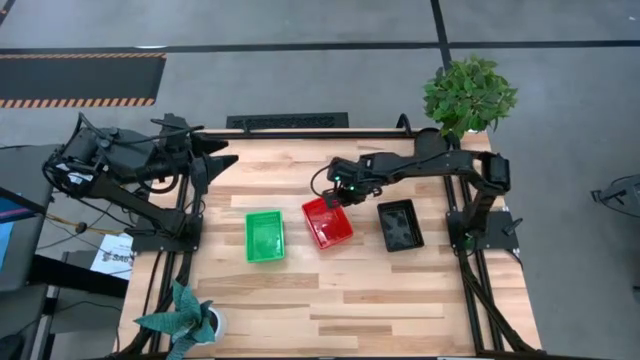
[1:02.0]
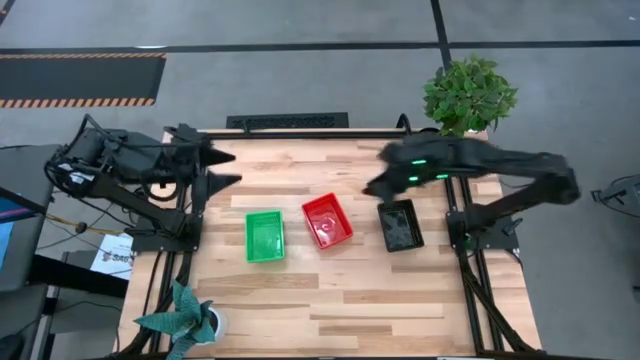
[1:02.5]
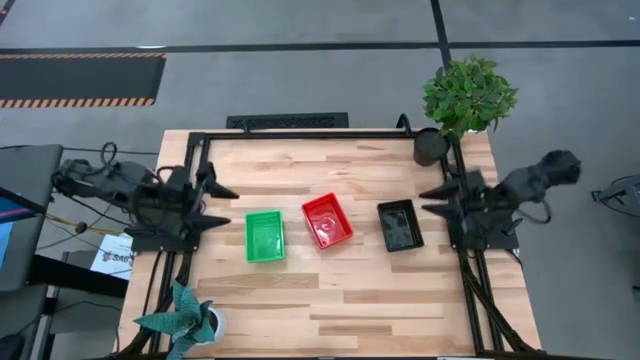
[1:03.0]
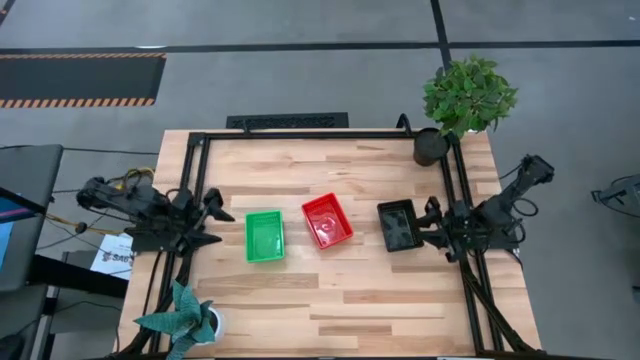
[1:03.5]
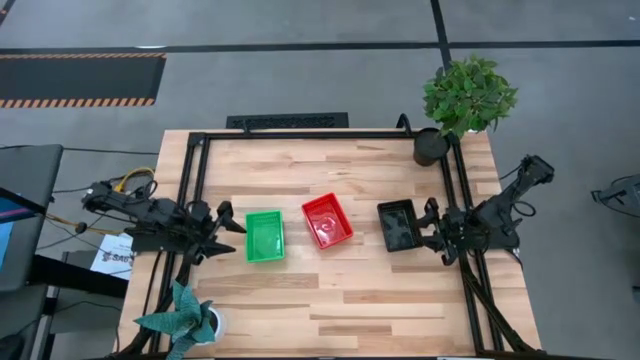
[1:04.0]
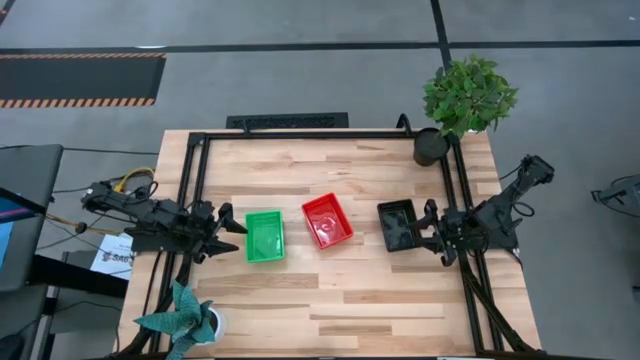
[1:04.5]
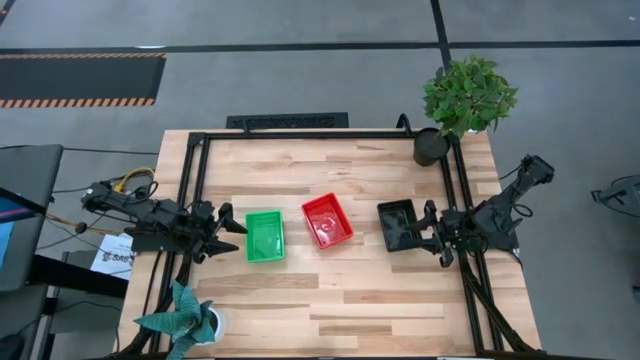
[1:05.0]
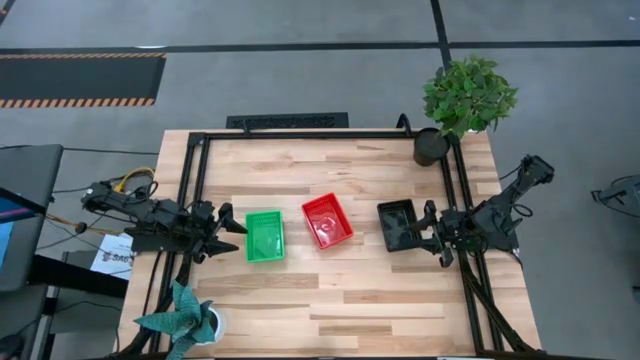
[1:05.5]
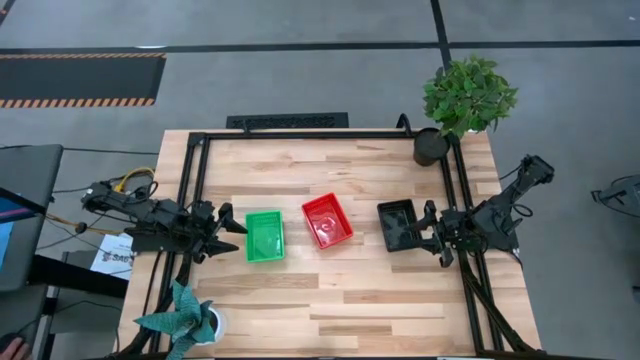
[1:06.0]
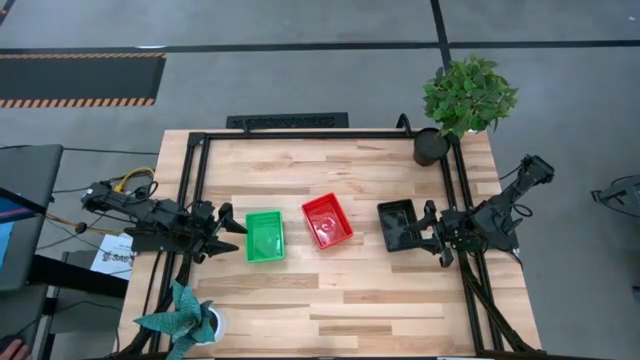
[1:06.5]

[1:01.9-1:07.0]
Return to Home Position

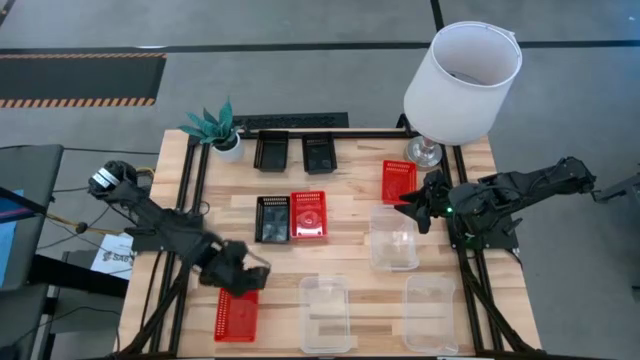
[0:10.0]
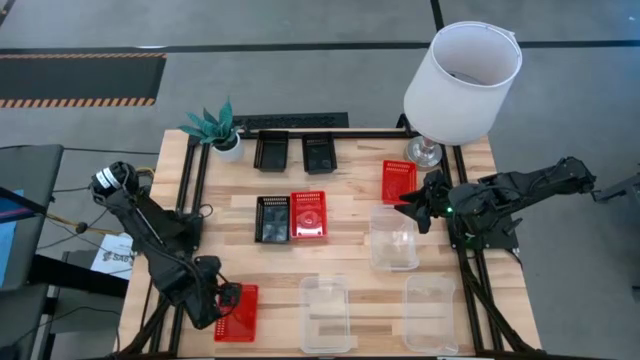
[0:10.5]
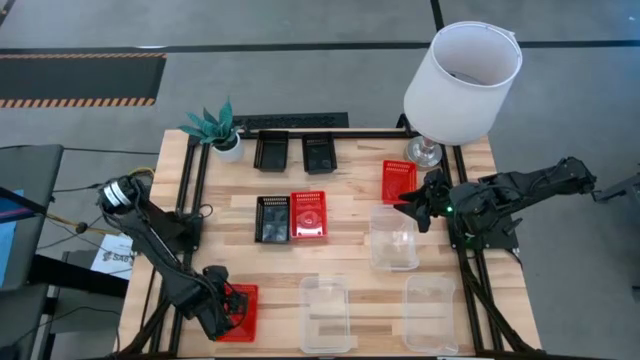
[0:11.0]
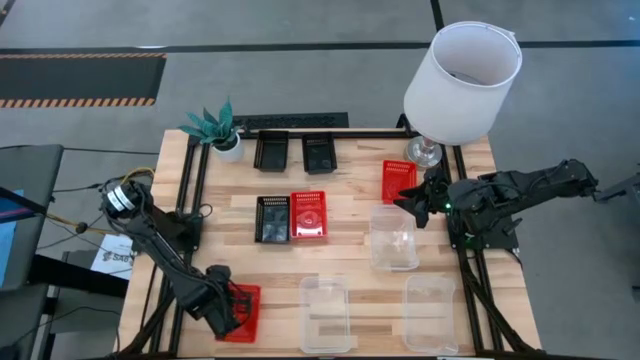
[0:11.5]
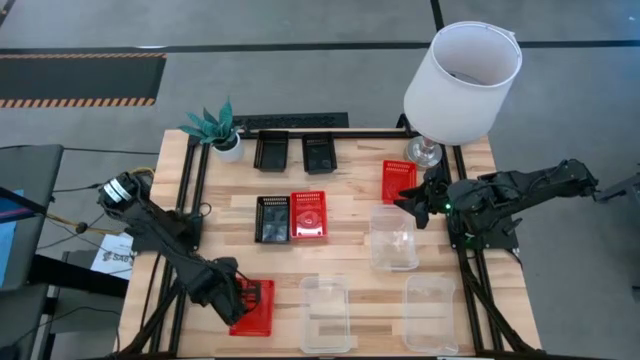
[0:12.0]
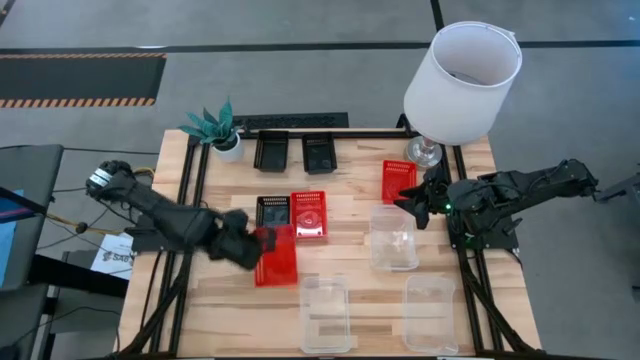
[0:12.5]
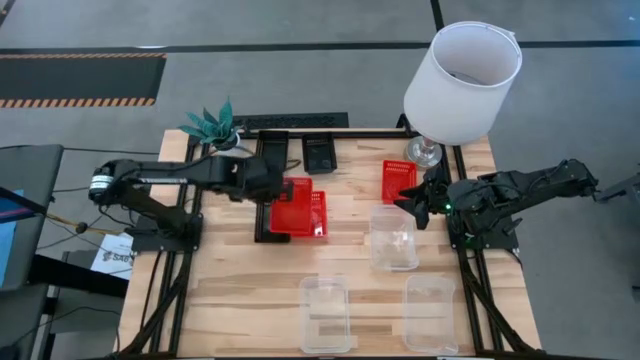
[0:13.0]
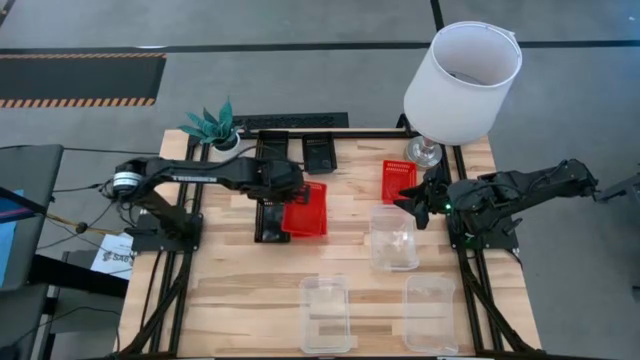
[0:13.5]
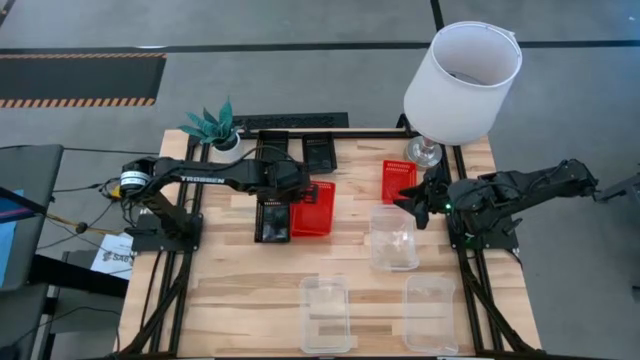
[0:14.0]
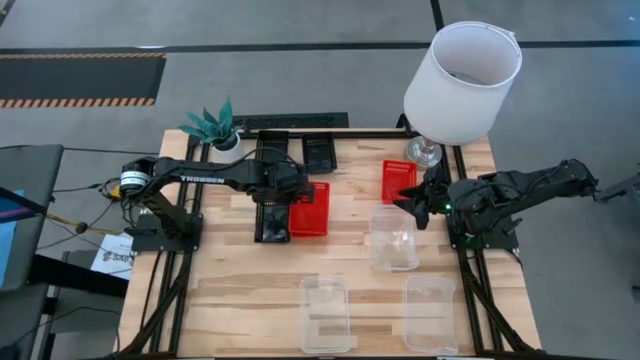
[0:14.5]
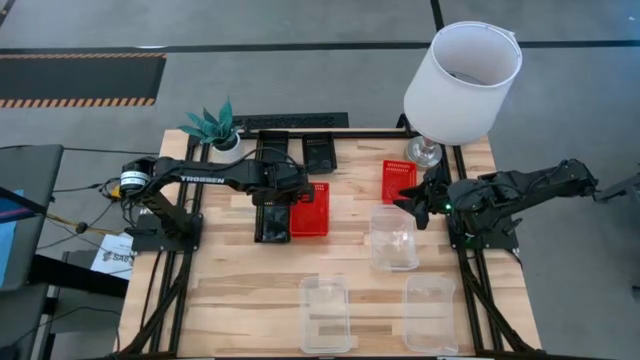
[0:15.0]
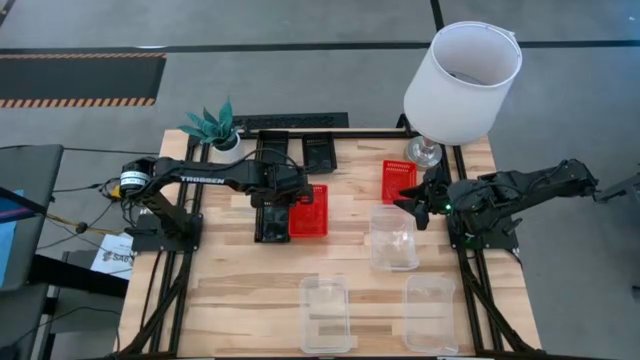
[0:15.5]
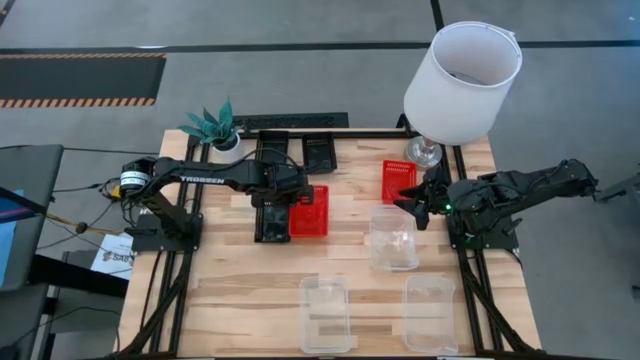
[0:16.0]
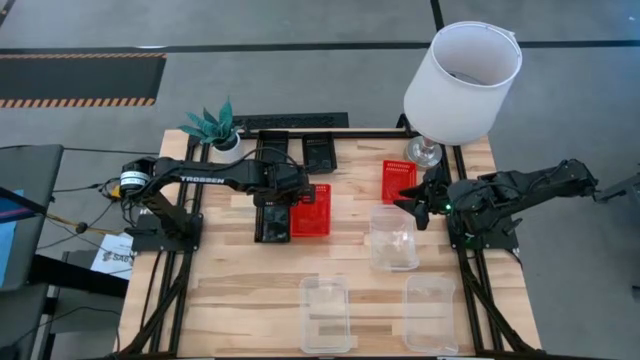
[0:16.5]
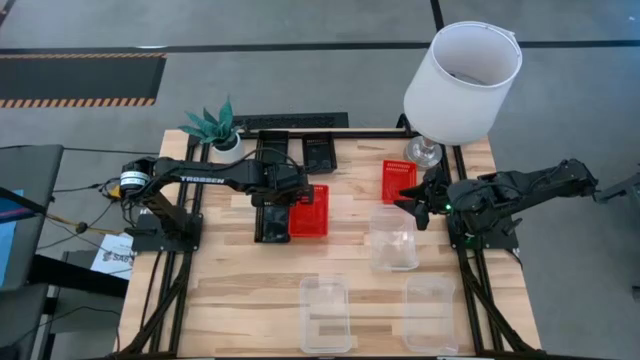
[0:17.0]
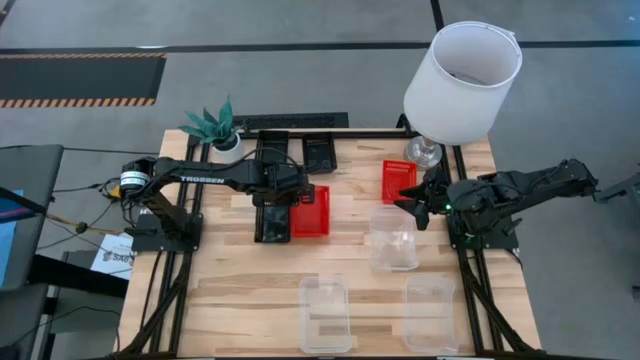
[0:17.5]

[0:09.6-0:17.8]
Stack the bottom red bin on top of the middle red bin

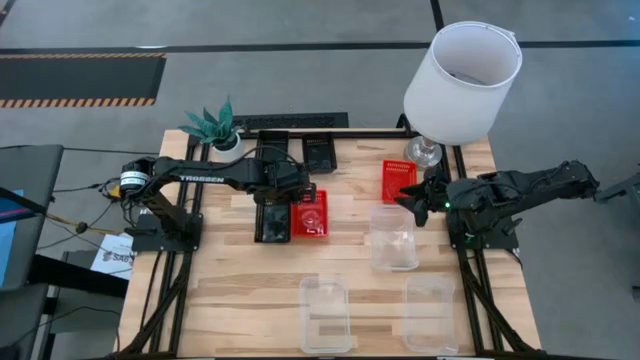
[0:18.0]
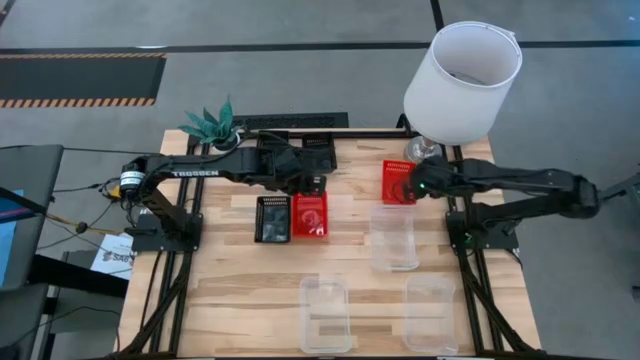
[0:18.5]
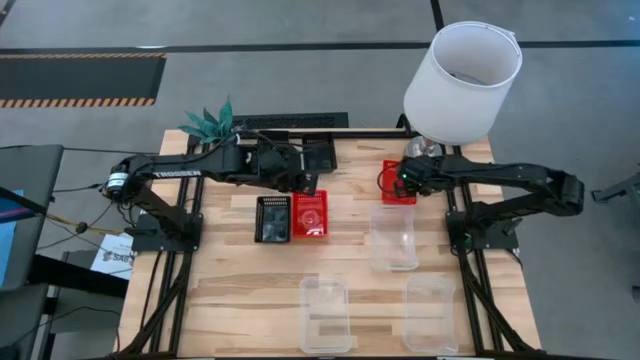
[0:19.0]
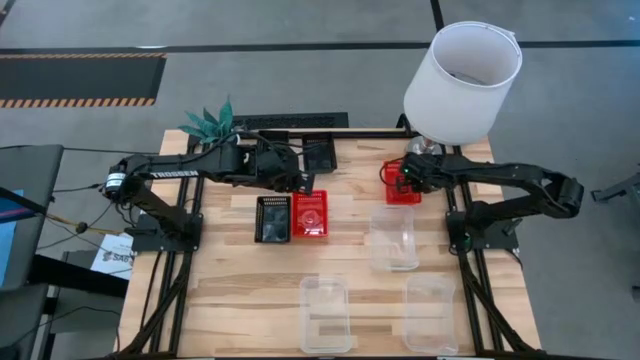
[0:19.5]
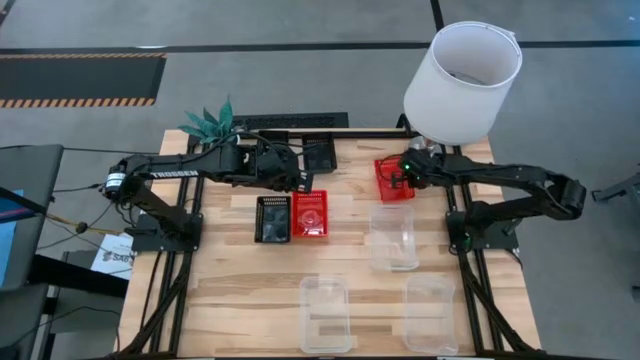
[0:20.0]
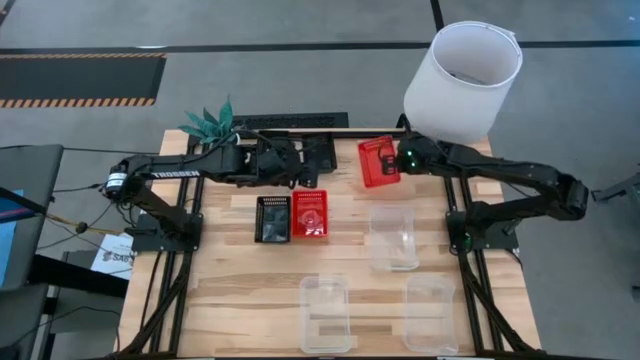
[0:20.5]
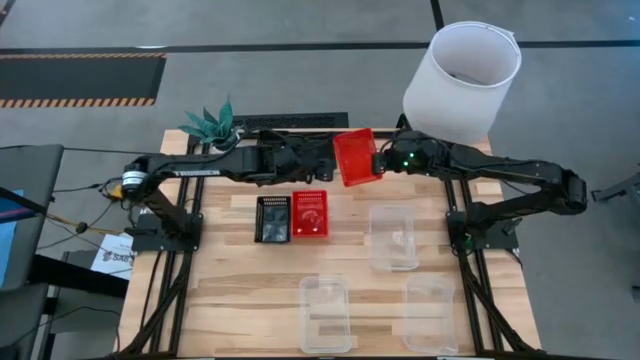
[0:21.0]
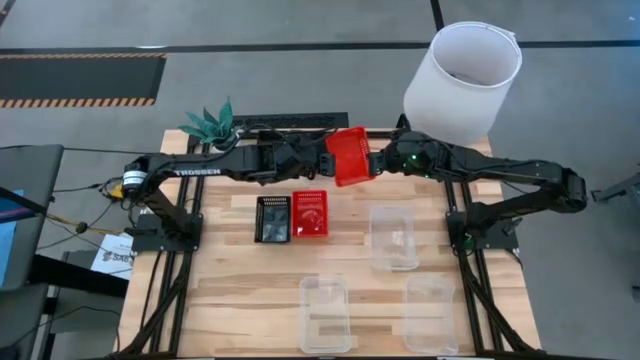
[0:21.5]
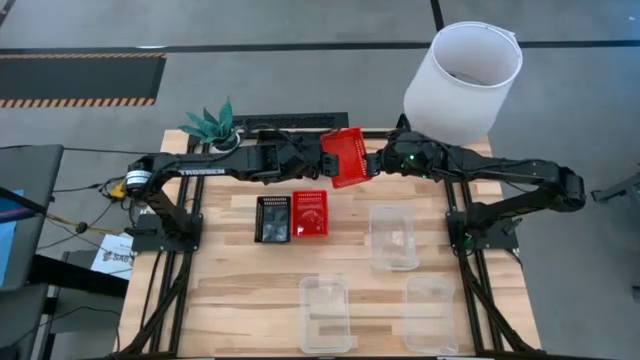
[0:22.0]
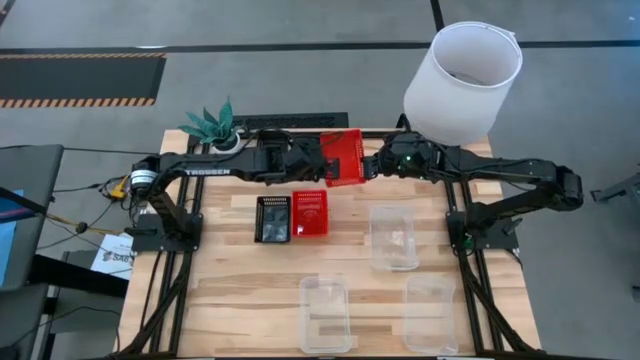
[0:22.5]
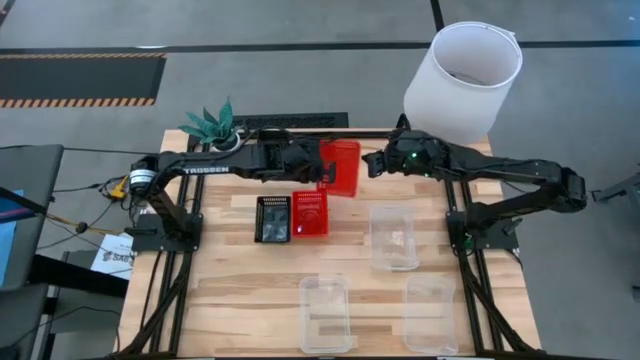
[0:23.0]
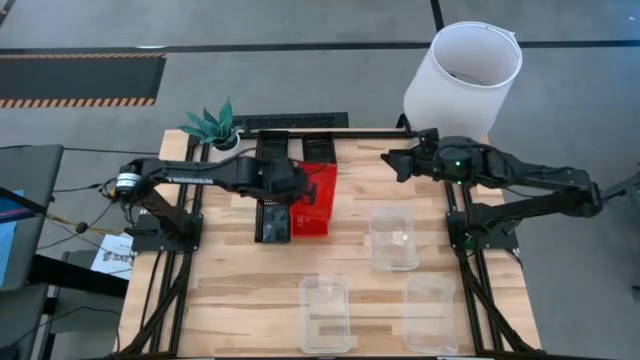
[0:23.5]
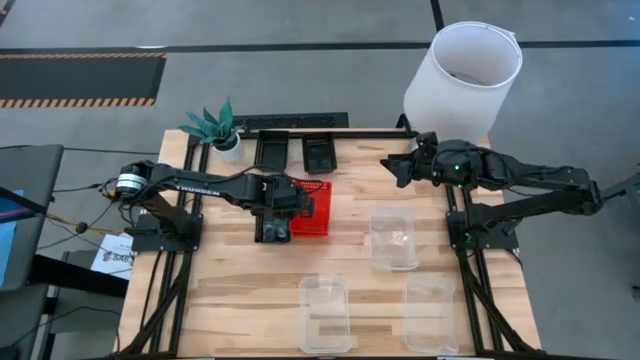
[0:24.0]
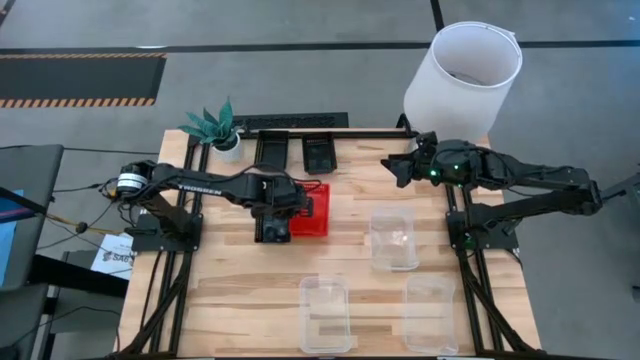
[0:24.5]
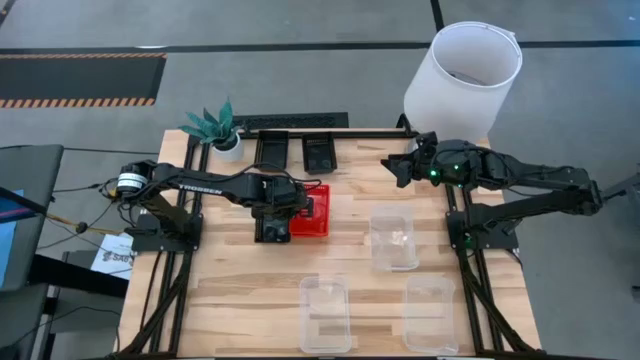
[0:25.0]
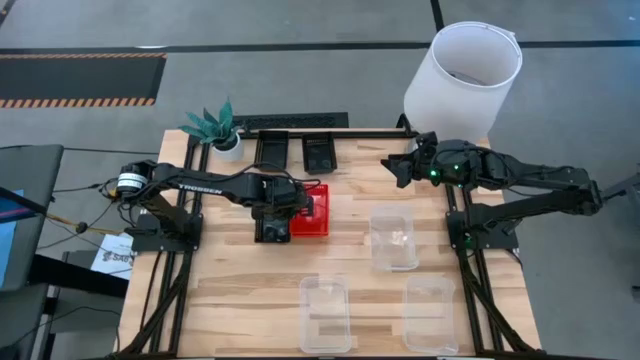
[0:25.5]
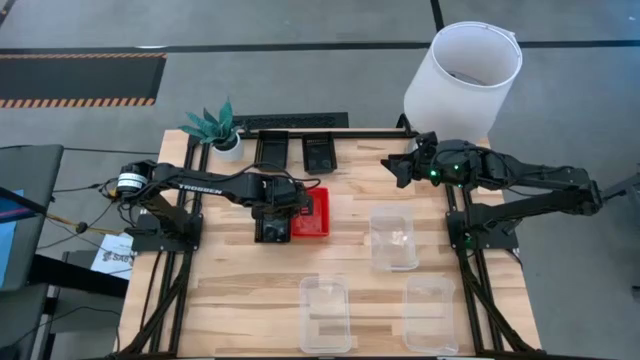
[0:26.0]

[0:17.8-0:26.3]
Stack the red bin on top of the left red bin
